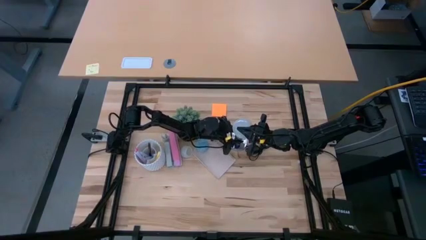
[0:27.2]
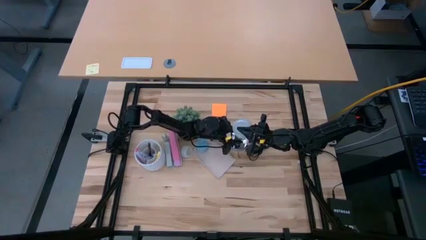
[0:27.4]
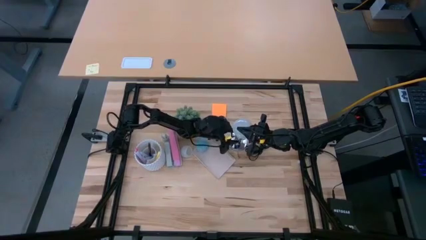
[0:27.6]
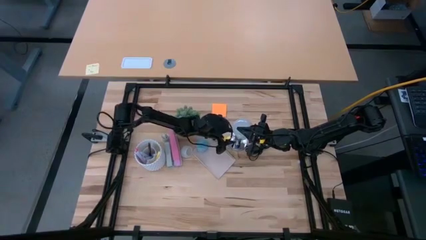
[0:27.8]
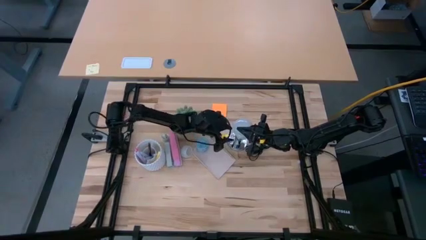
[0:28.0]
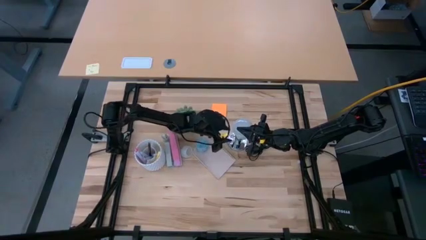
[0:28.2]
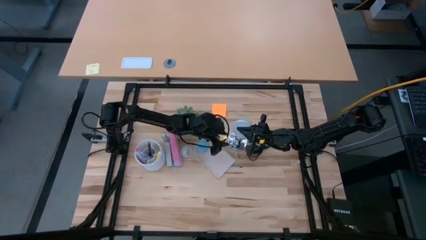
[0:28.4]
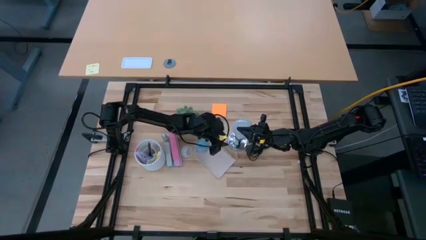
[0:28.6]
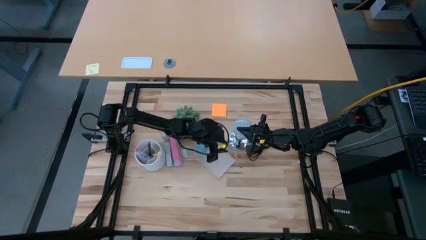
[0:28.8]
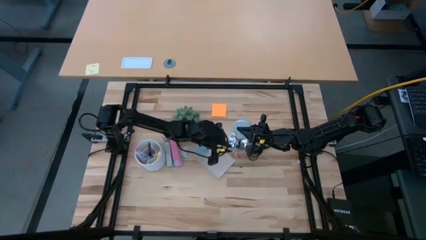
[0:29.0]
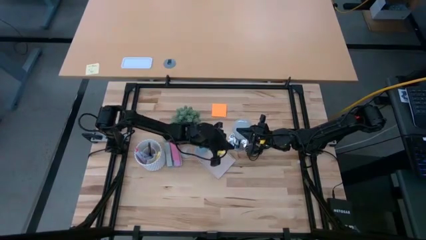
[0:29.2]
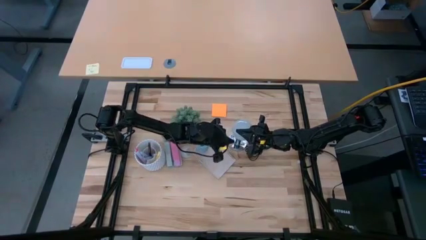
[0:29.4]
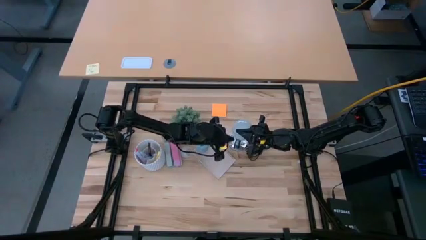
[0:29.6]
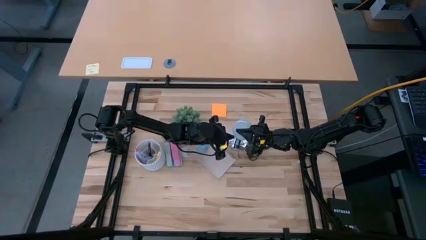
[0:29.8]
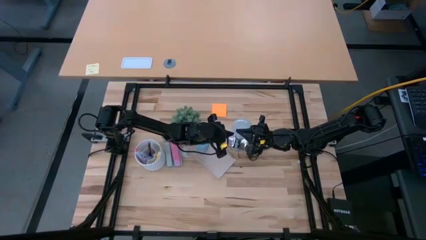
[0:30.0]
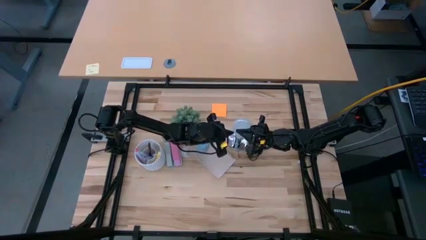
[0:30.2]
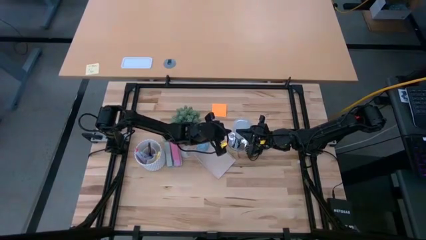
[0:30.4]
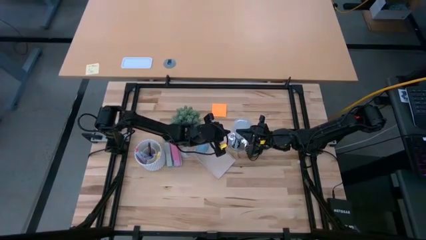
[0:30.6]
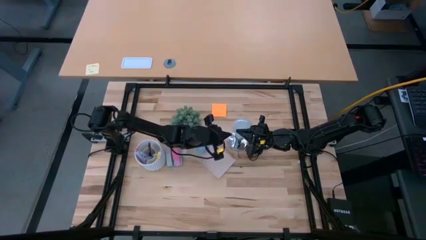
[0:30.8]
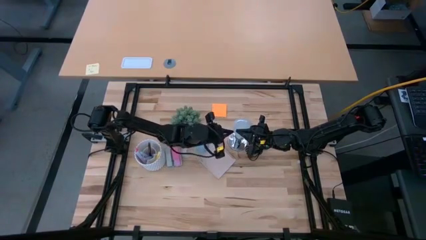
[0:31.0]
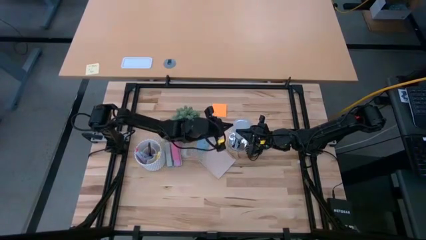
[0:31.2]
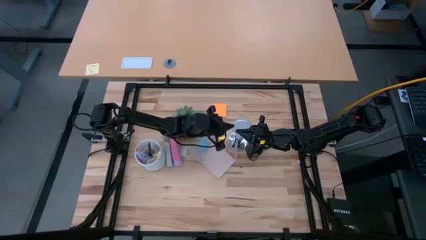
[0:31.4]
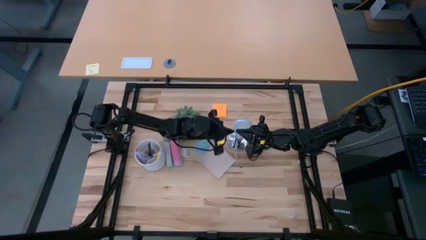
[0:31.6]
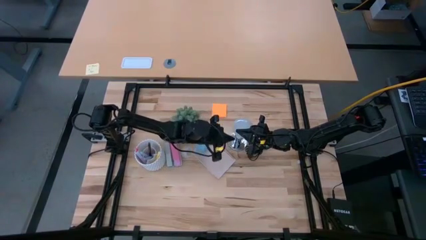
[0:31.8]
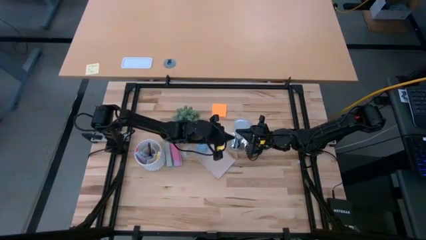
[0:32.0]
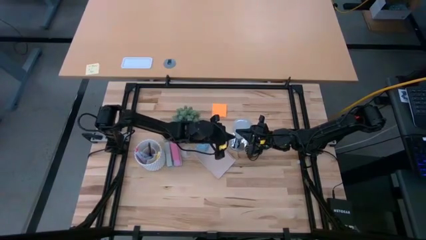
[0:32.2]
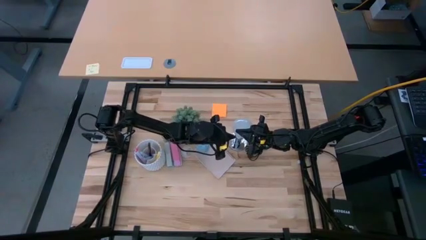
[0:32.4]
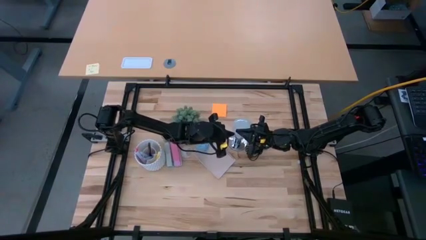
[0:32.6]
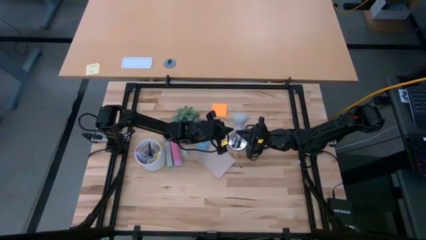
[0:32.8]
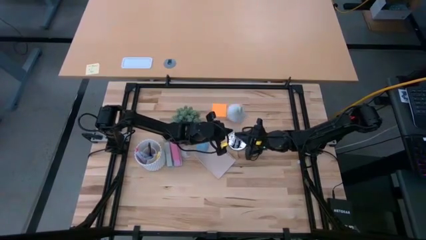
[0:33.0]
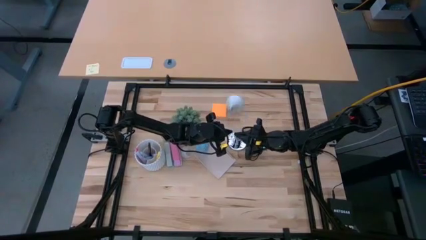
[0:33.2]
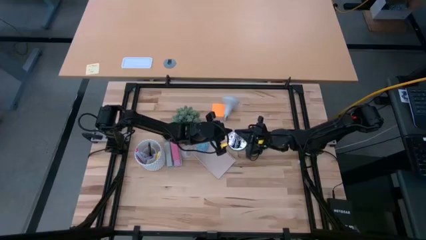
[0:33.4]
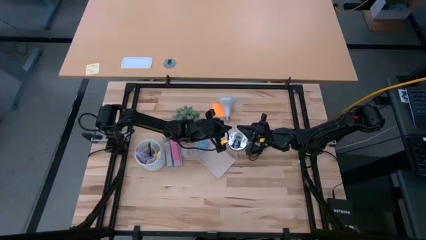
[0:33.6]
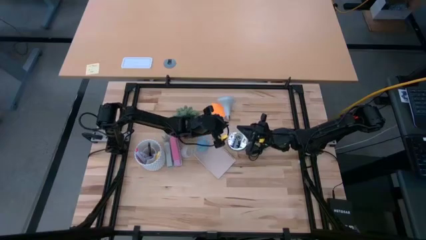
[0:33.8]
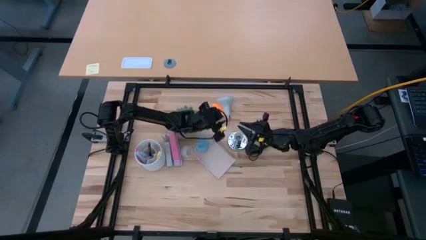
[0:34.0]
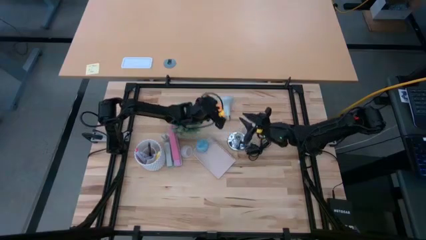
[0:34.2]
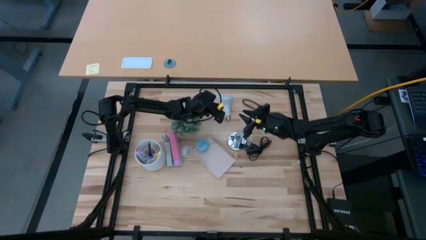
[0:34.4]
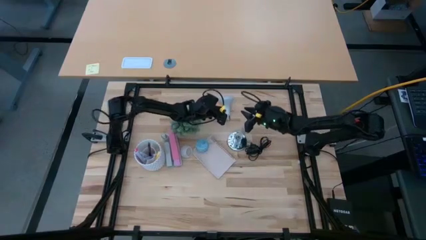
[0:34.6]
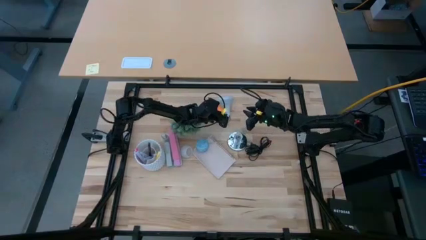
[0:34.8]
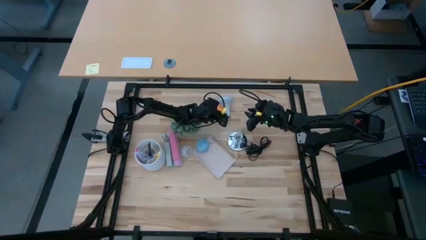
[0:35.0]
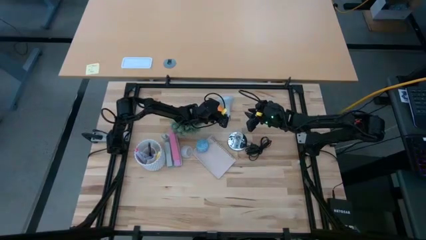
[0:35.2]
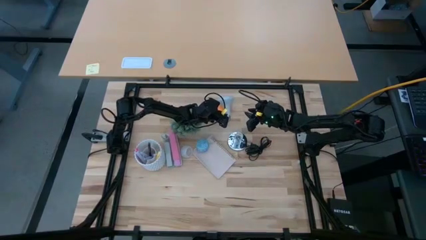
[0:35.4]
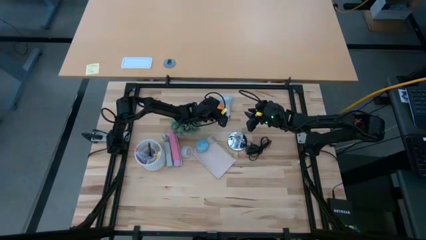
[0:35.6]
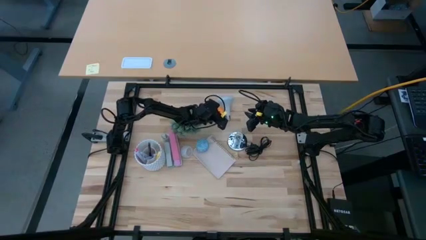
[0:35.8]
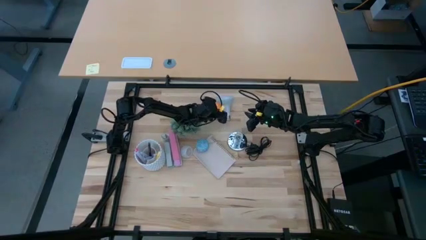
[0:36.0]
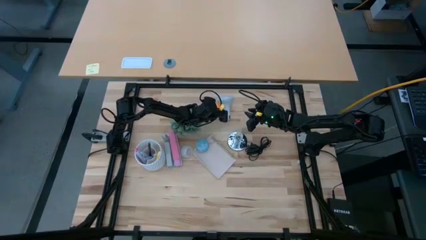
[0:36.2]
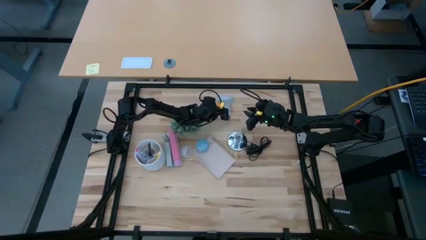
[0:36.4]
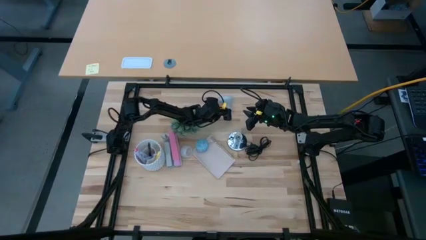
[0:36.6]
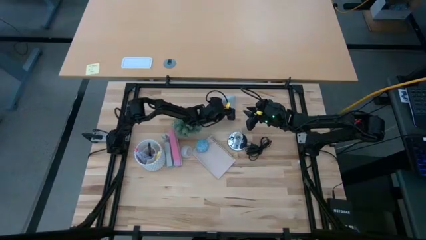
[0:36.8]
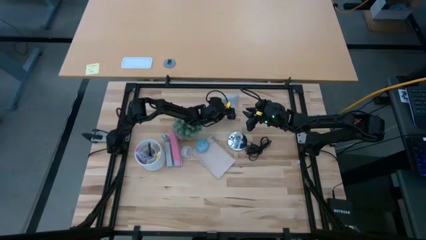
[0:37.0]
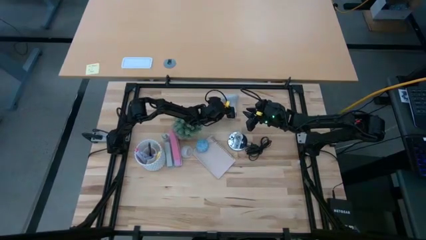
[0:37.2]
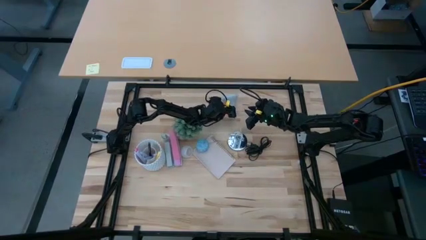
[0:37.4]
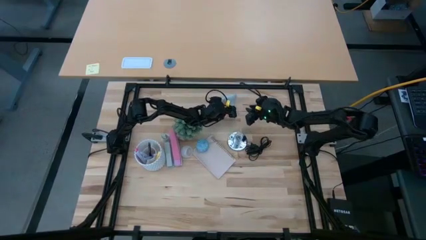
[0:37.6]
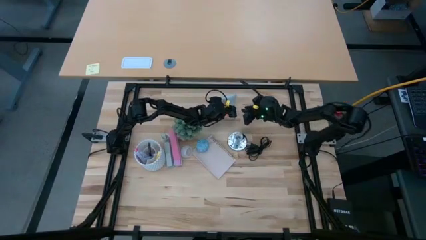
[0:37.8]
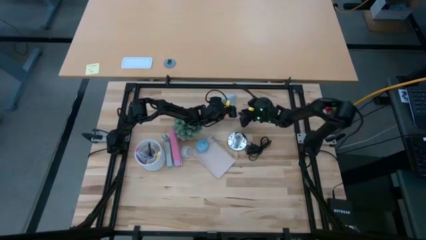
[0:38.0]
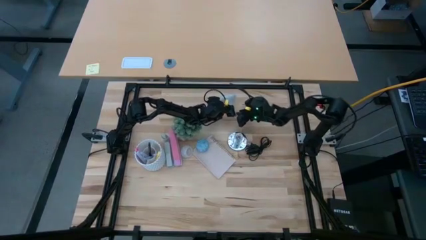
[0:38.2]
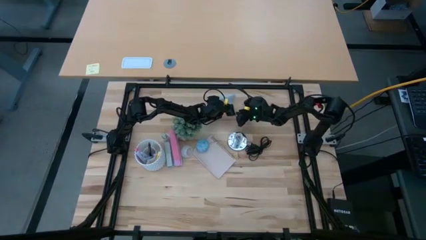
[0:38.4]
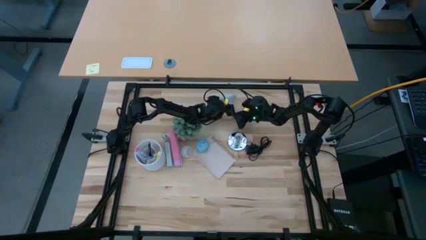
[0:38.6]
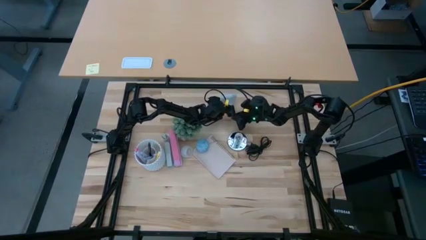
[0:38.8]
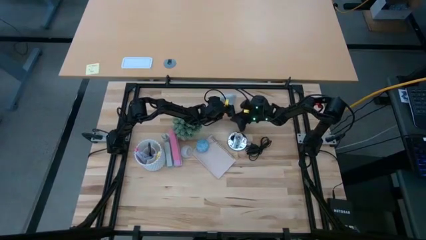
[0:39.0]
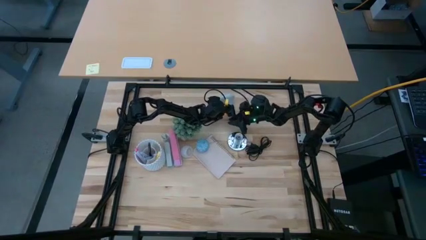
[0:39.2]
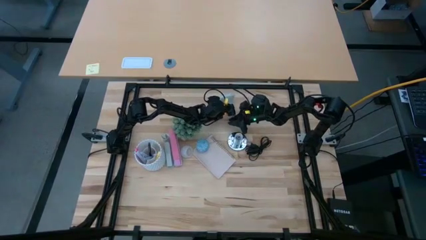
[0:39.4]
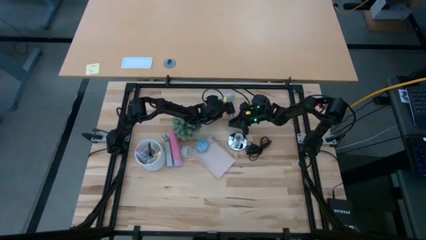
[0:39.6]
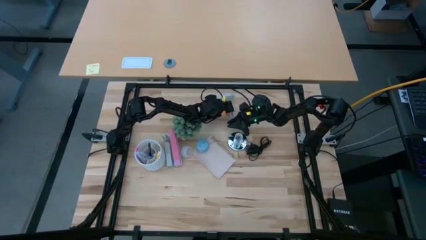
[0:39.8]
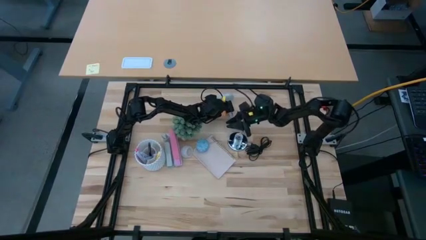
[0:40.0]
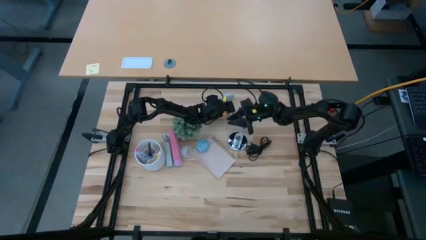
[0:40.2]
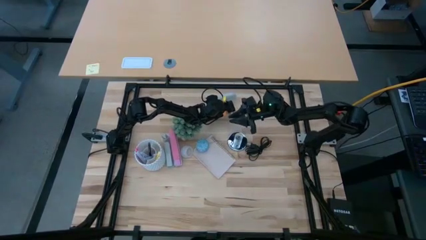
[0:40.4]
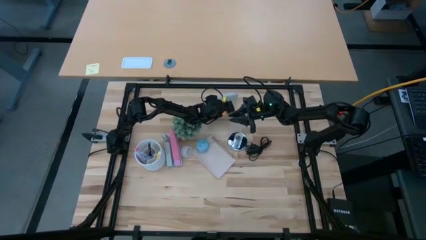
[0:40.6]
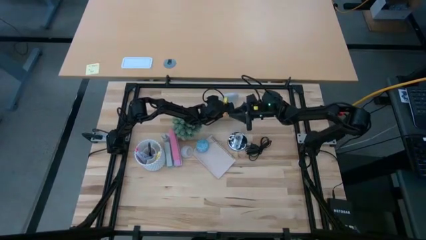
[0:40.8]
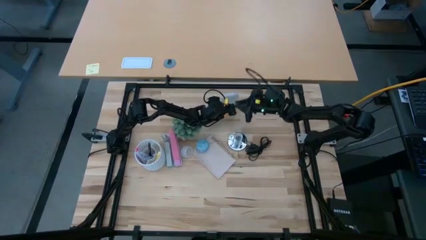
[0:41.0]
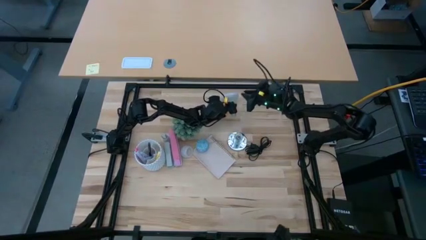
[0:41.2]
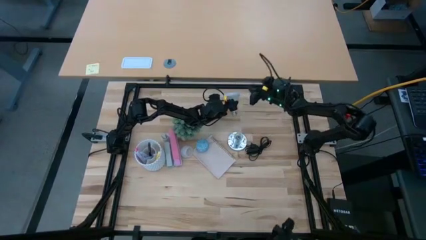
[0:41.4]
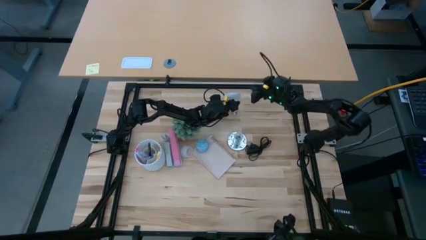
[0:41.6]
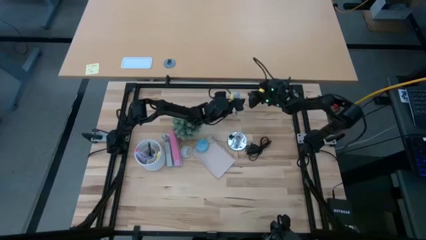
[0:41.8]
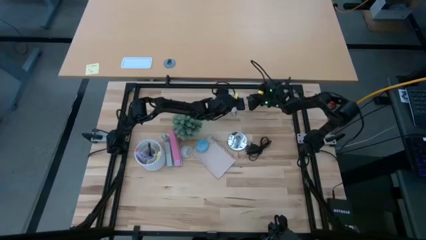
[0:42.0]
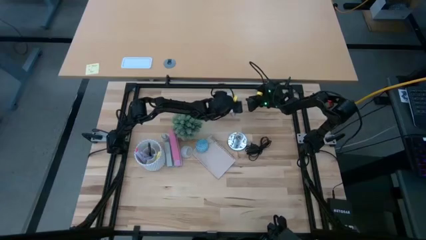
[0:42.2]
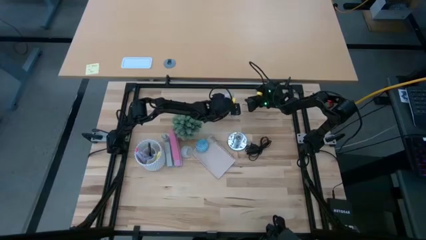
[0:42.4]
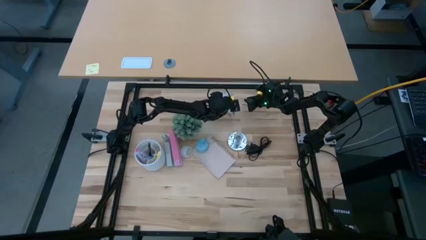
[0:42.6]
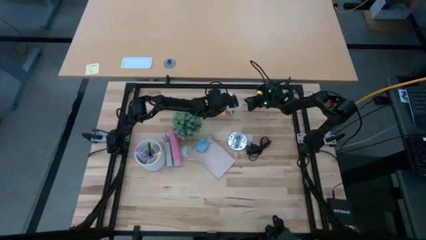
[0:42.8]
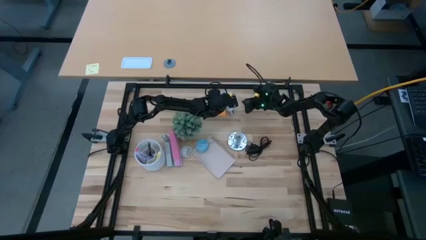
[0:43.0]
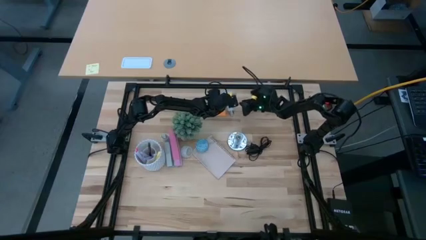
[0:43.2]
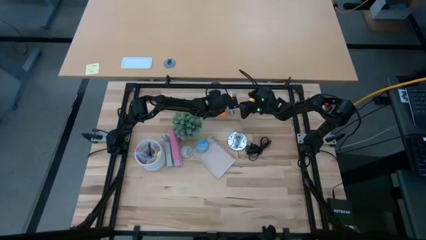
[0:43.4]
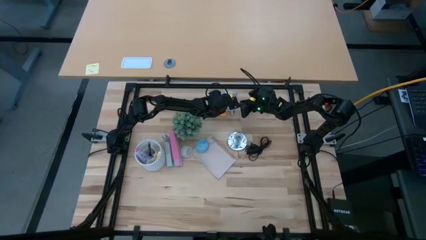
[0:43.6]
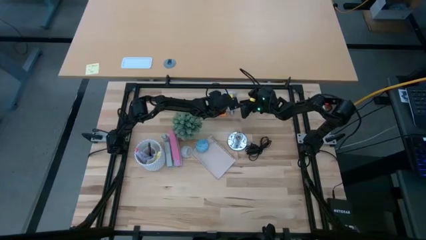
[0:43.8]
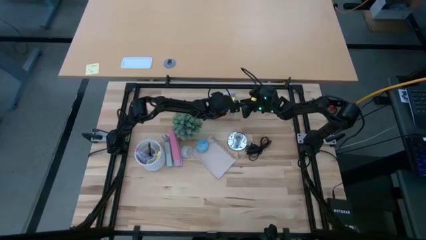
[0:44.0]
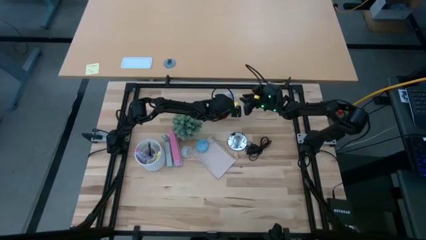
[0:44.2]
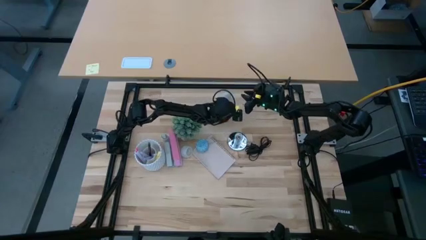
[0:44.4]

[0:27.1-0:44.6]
Task: Screw lightbulb
Insert the lightbulb into the silver lamp socket
